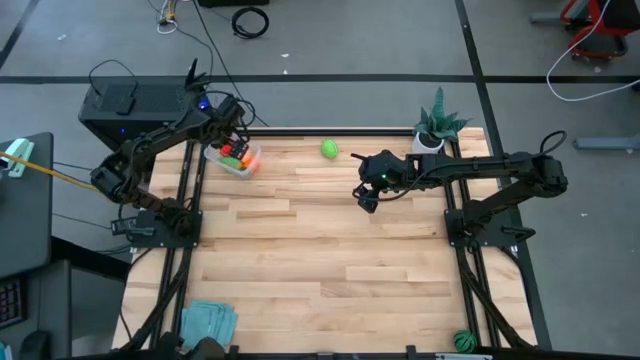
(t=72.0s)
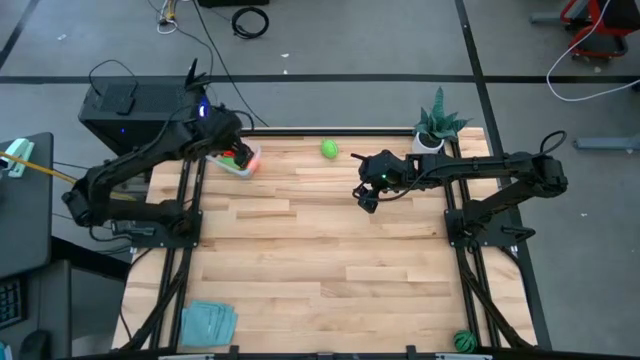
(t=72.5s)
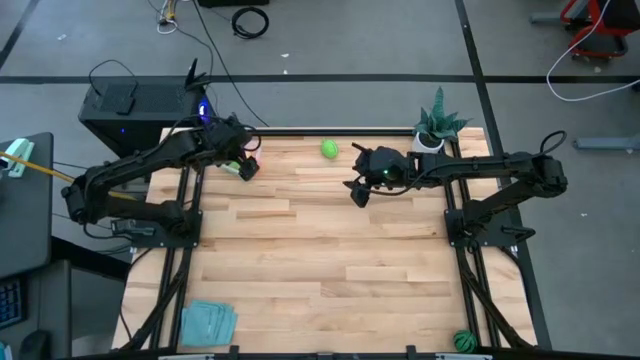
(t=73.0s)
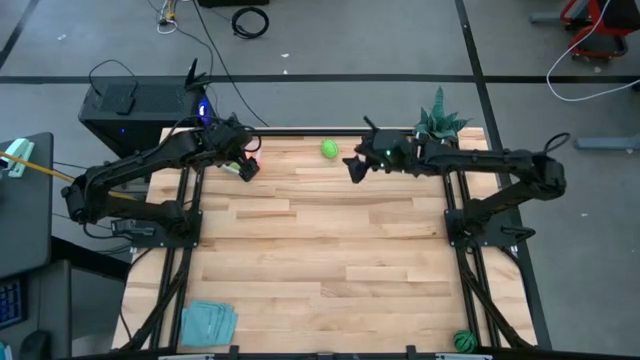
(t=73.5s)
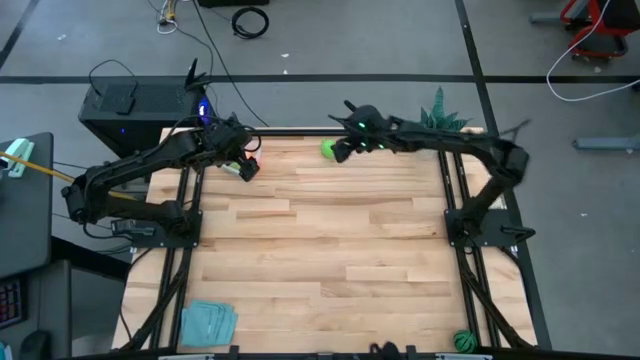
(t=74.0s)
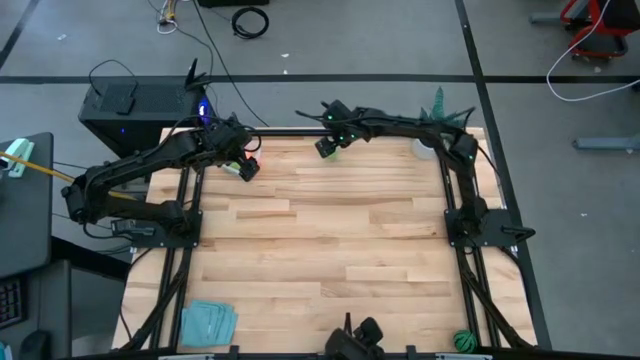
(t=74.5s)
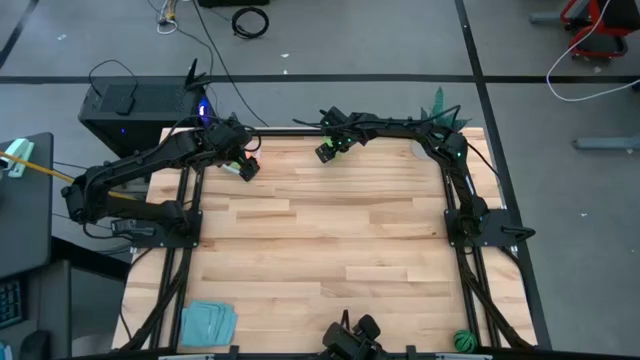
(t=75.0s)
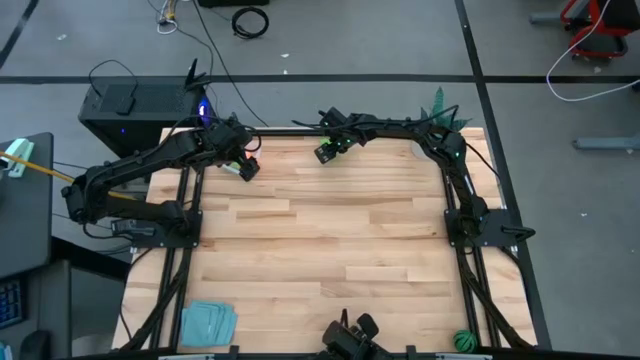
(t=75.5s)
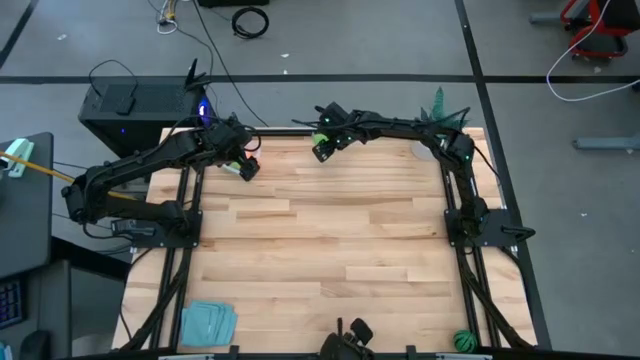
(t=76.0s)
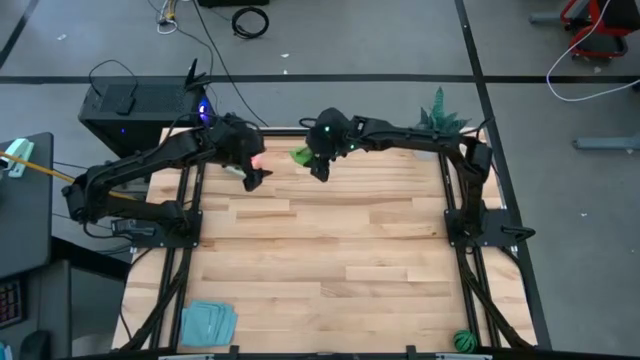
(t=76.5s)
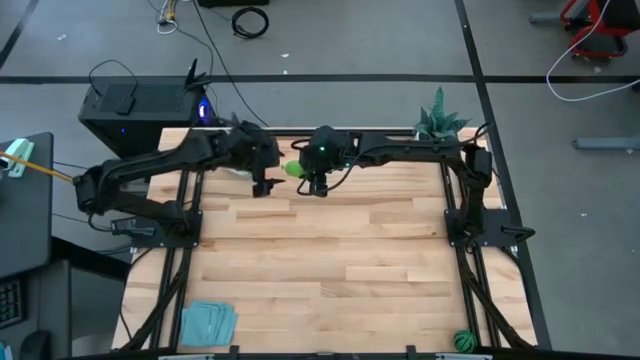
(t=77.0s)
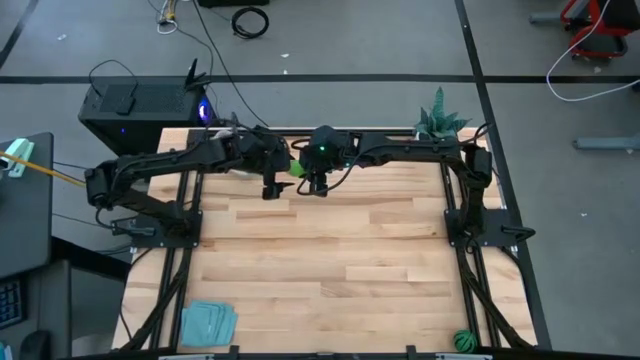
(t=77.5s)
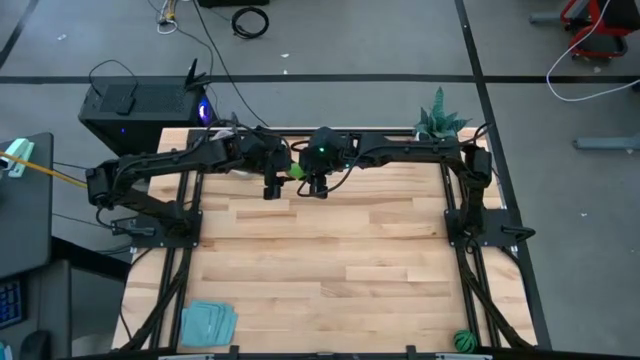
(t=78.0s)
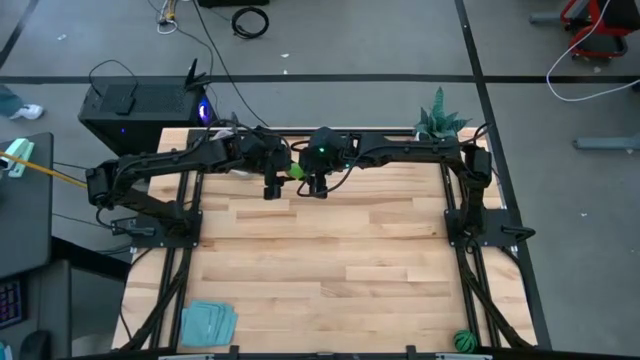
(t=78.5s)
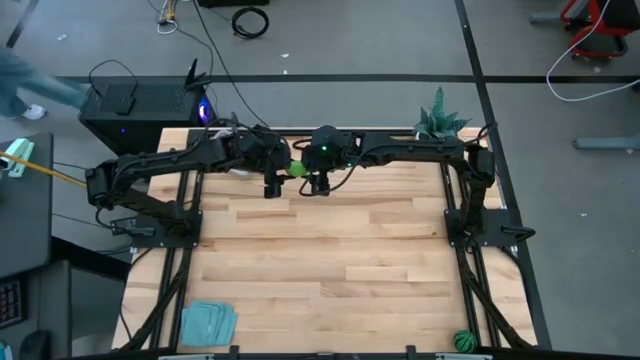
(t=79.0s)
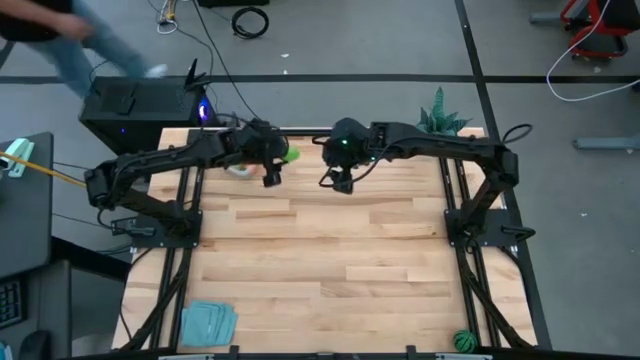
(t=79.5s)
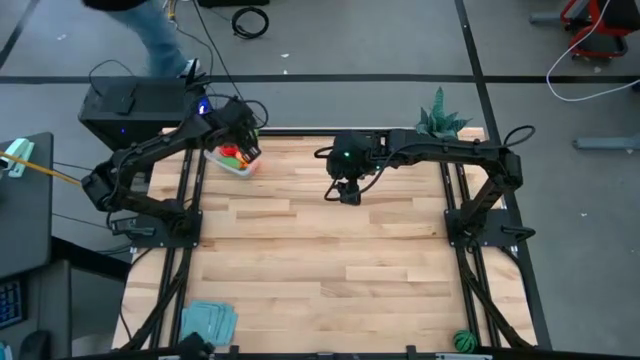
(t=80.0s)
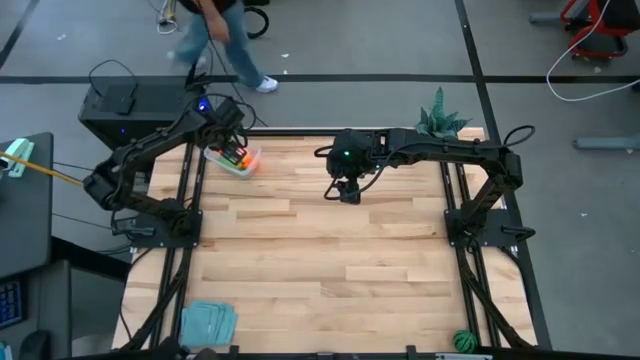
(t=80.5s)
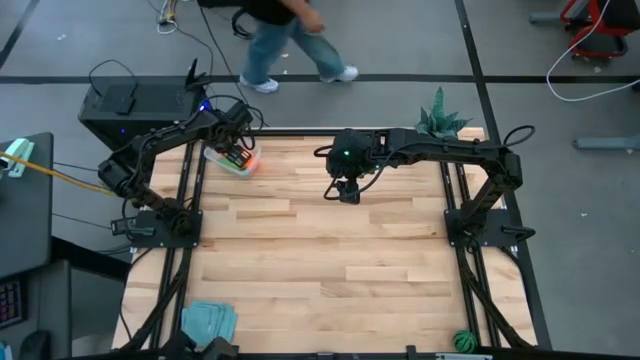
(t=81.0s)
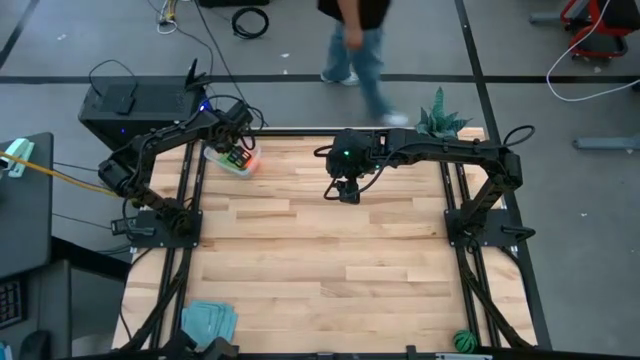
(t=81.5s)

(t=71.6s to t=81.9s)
Task: Pick and placing Produce into tupperware
Put the green melon into the transparent bin

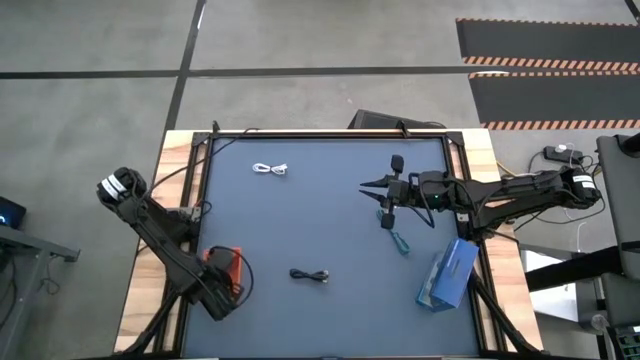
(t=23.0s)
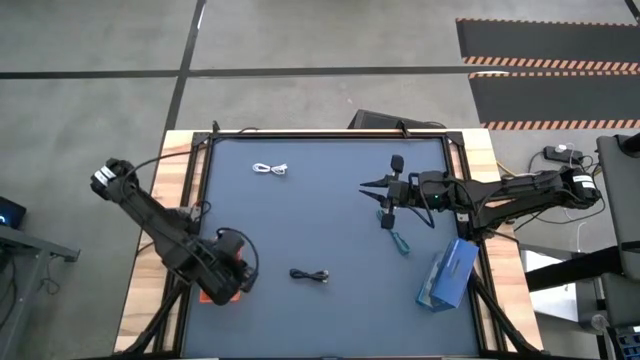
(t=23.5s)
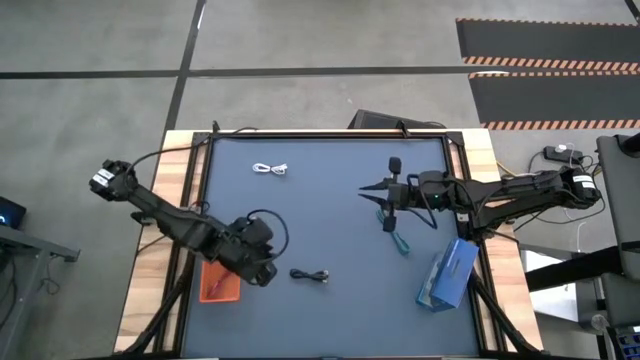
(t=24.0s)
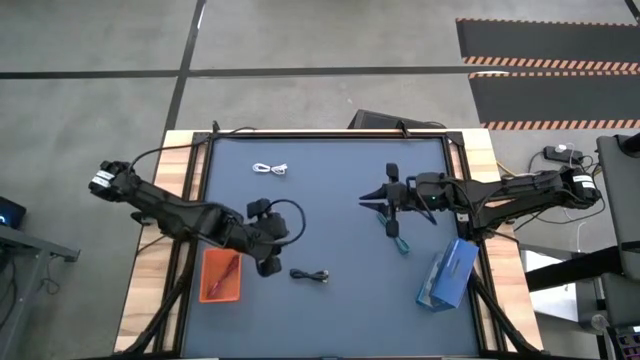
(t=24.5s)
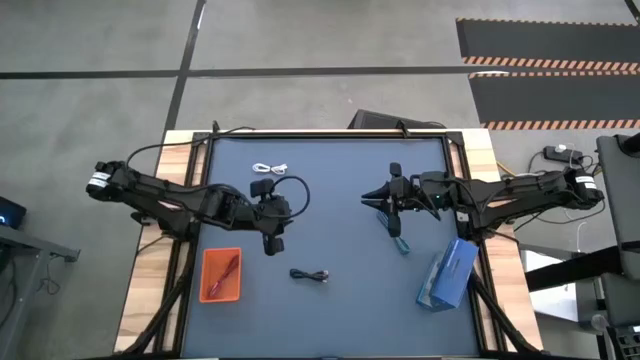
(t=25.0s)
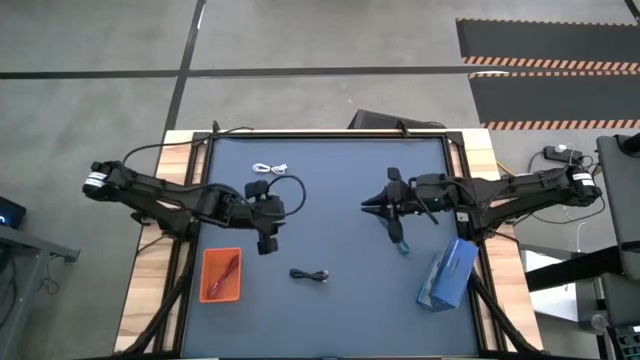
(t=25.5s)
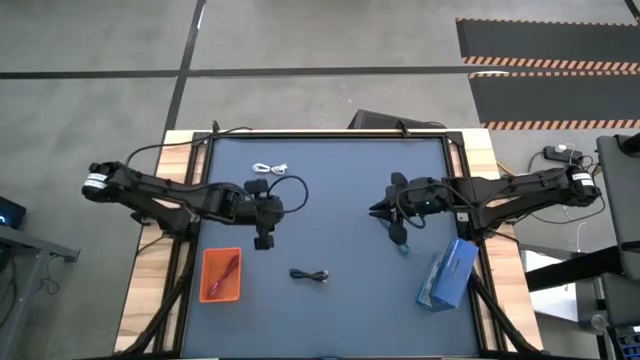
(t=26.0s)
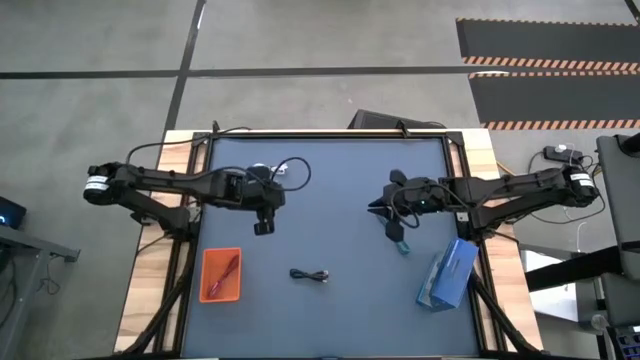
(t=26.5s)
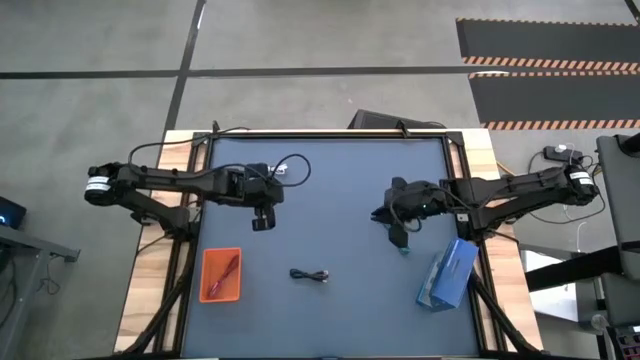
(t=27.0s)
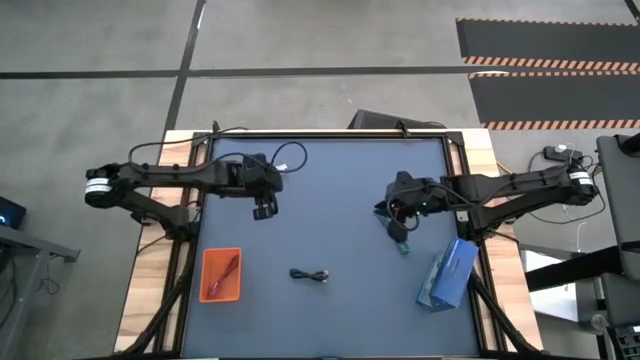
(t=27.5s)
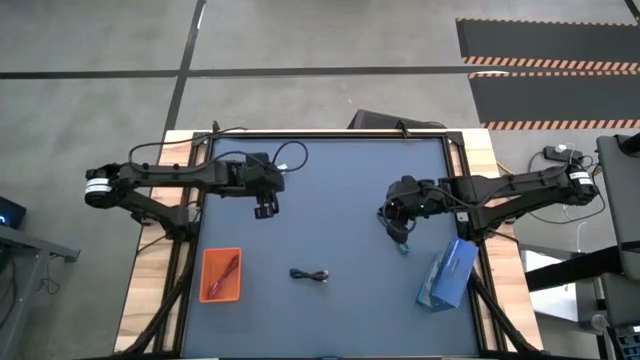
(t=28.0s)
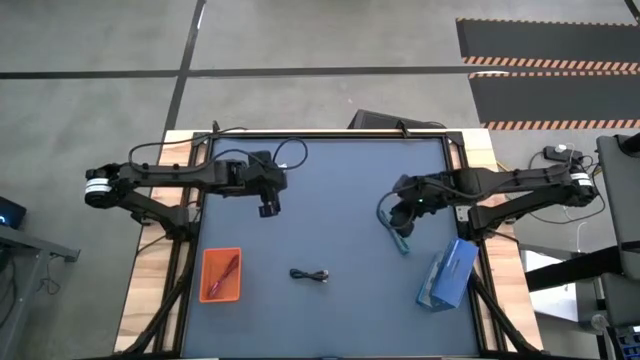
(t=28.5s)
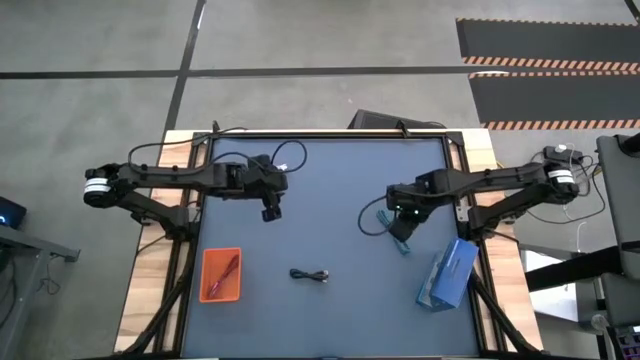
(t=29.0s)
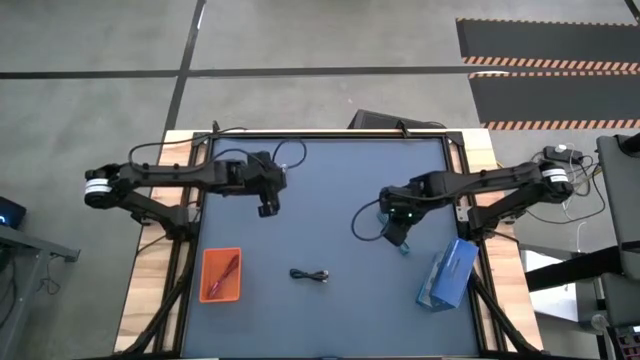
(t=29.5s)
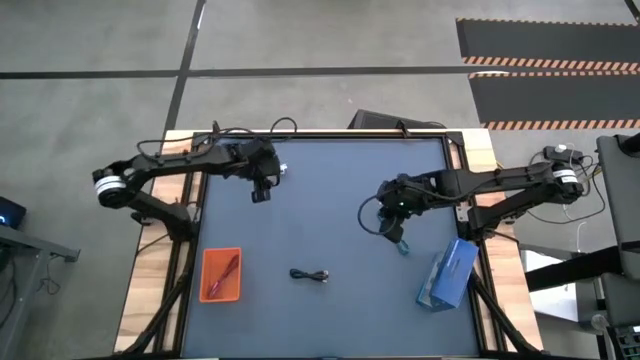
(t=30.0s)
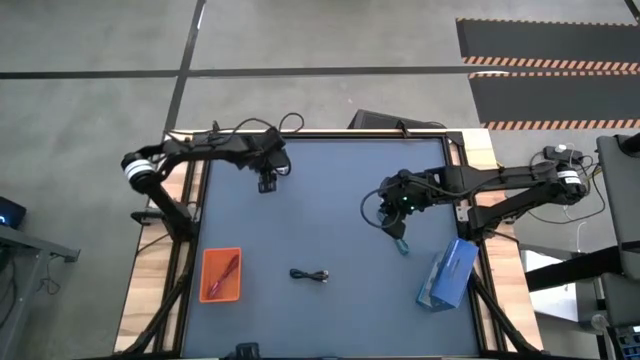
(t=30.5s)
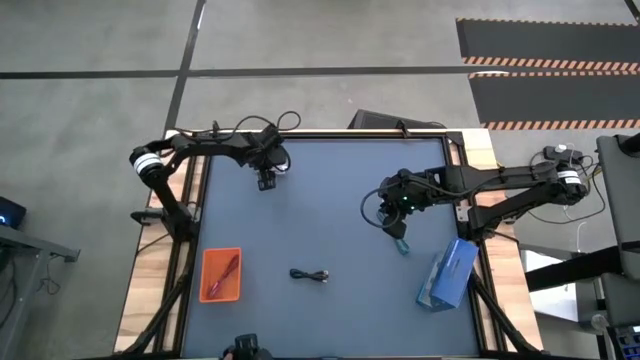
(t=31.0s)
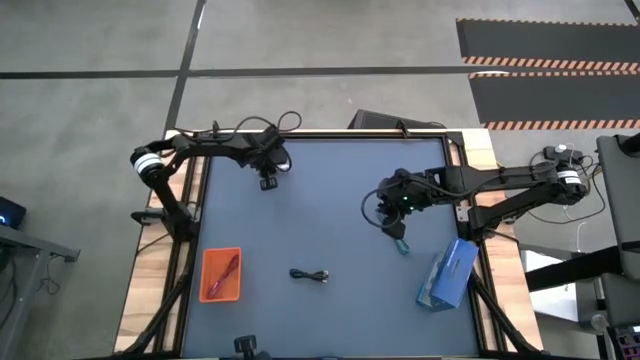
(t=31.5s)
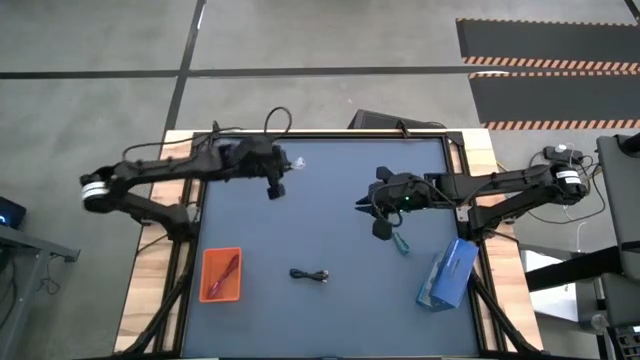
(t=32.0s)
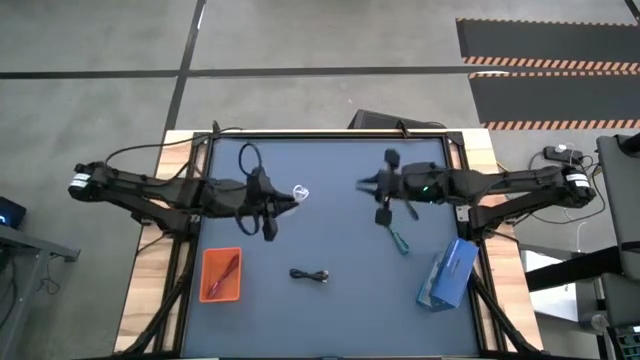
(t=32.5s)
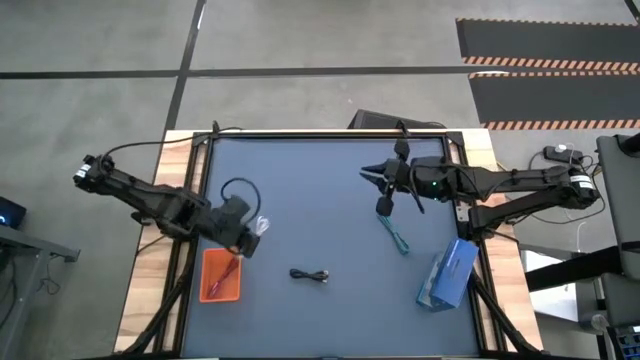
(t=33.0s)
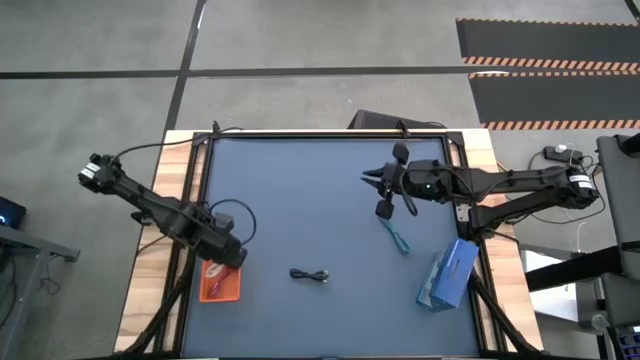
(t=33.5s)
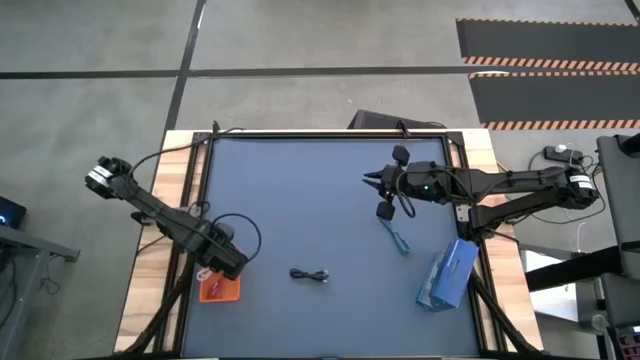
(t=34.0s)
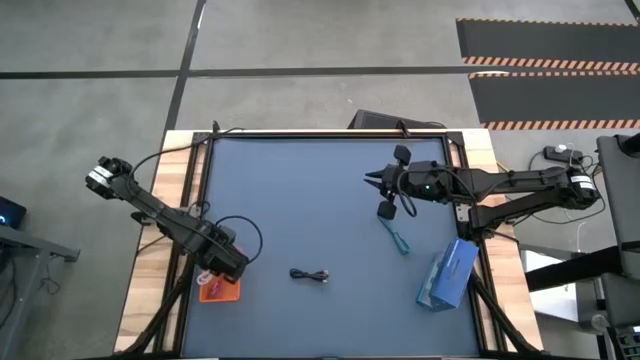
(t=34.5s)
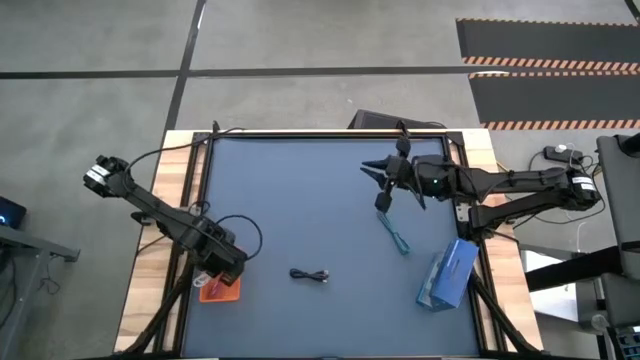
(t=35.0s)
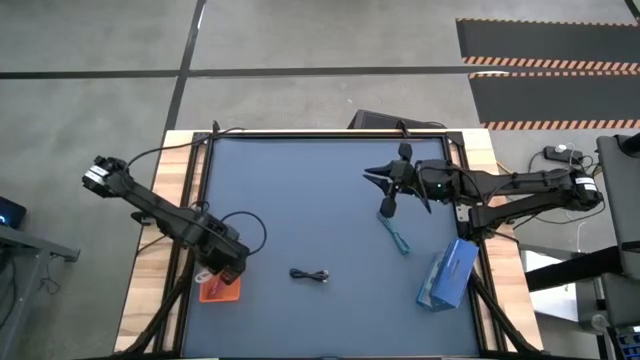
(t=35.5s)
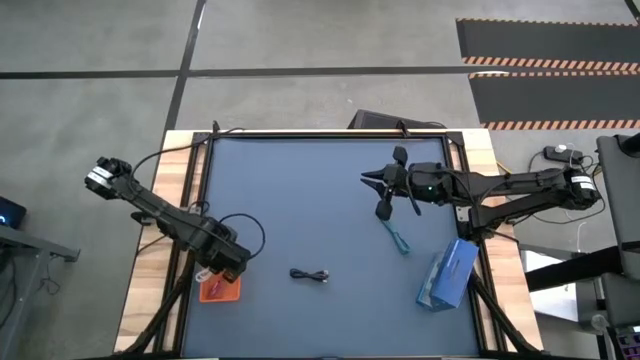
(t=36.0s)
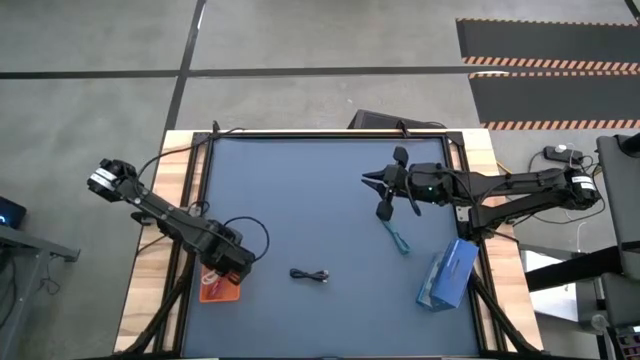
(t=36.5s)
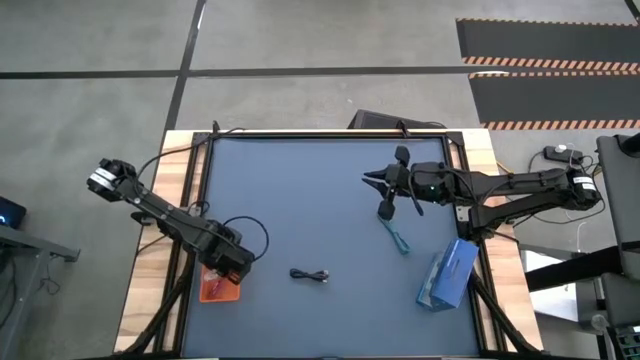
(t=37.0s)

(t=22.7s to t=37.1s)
Task: Pick and place USB-C Cables
Put the white charger cable into the orange bin
